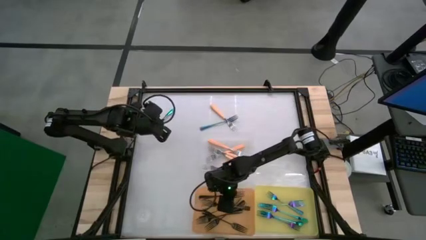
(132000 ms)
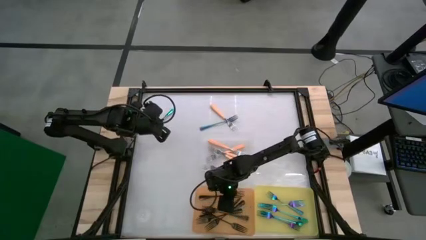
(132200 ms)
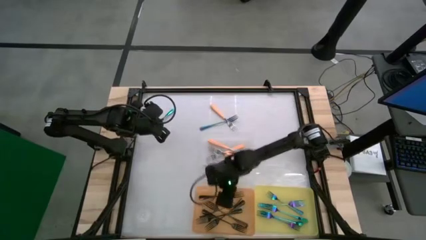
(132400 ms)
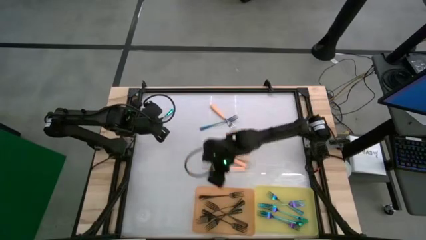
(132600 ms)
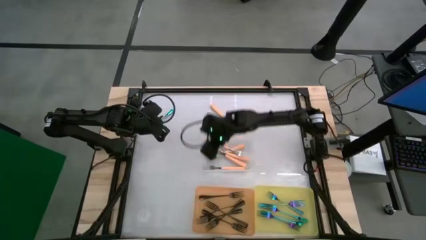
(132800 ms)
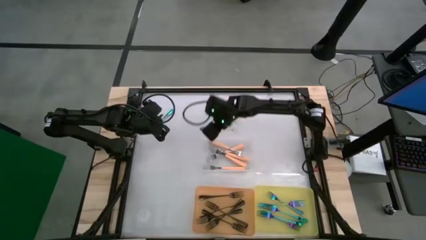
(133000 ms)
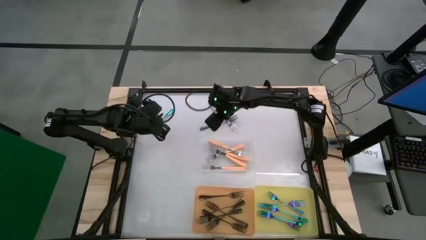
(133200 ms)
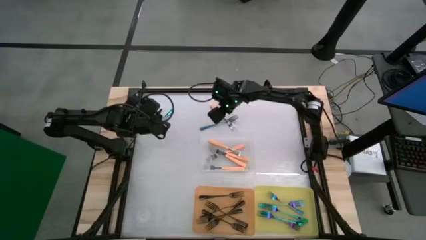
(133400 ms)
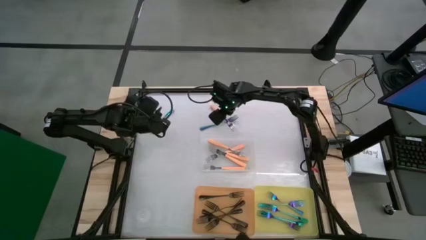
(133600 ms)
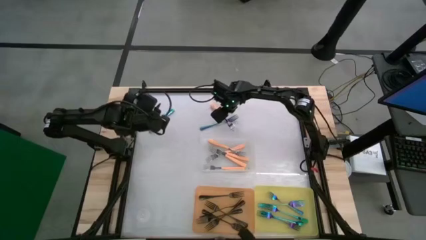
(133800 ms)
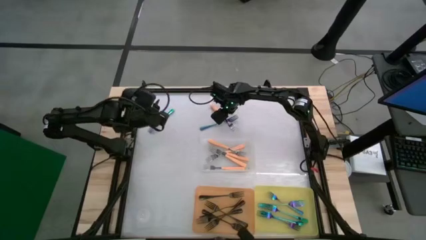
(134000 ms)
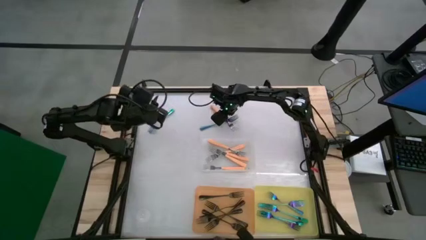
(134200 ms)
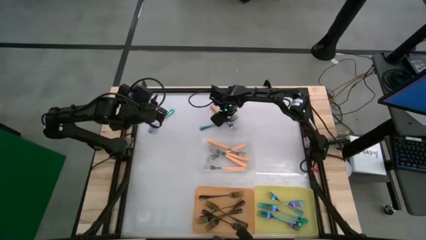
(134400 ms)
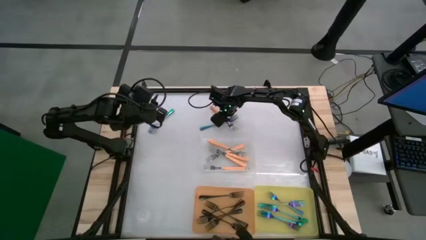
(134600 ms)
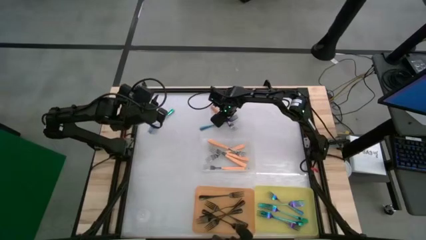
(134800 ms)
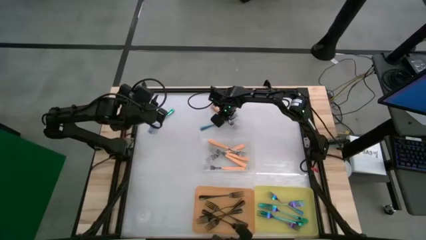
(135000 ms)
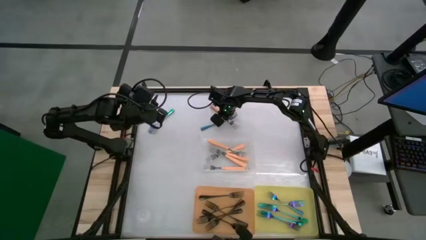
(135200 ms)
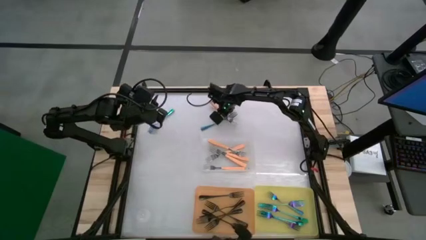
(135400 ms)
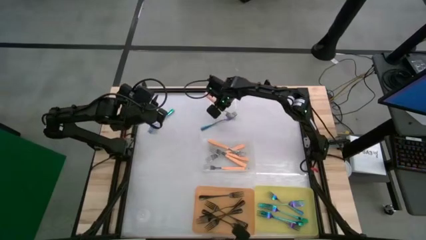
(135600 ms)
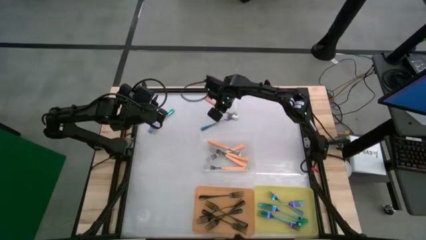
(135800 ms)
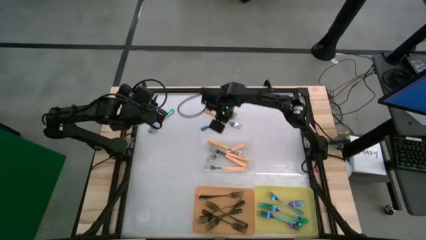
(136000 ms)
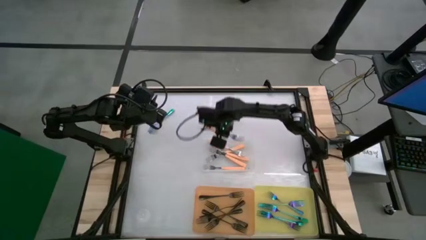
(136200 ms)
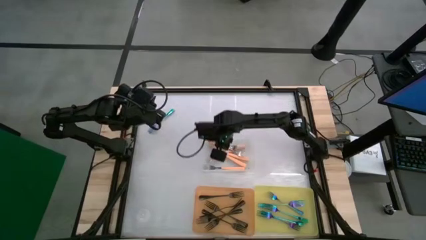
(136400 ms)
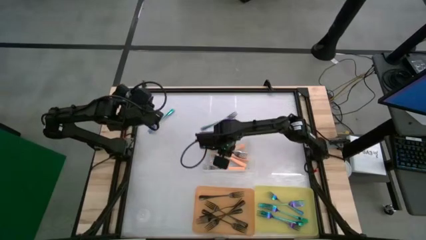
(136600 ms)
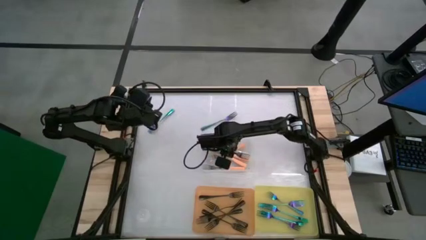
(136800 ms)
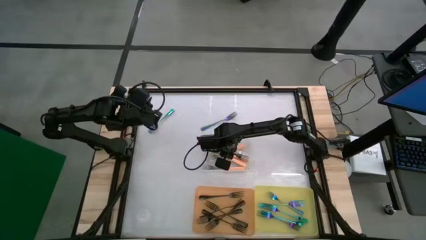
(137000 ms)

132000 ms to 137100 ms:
Task: Sort silverware by color (type)
Put the orange fork into the transparent bin

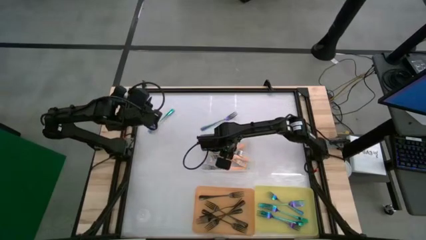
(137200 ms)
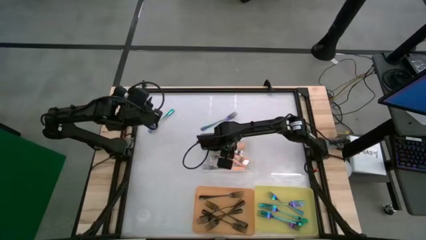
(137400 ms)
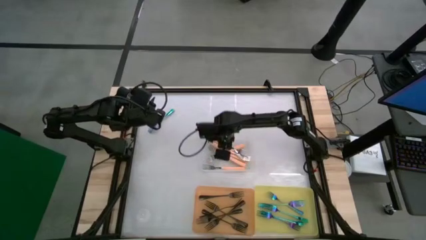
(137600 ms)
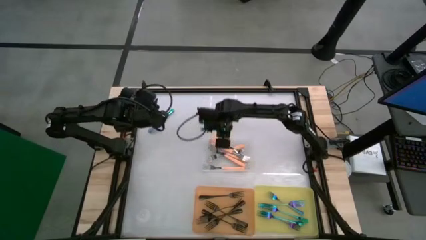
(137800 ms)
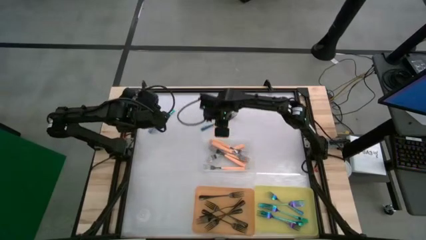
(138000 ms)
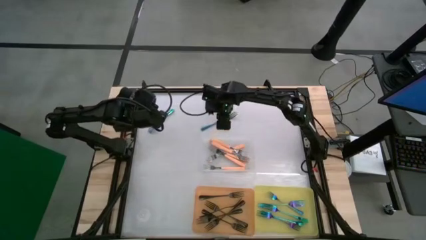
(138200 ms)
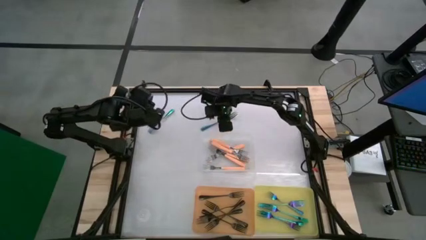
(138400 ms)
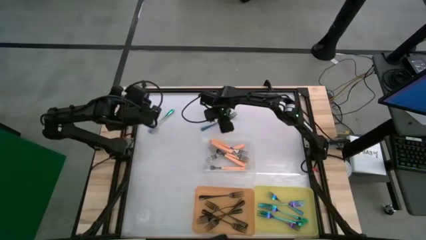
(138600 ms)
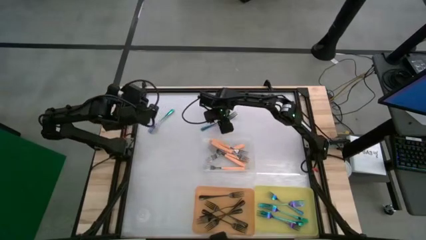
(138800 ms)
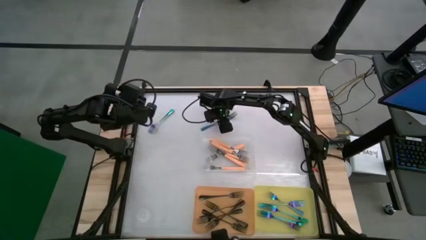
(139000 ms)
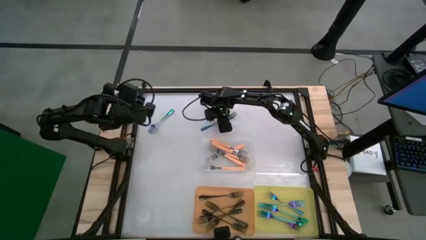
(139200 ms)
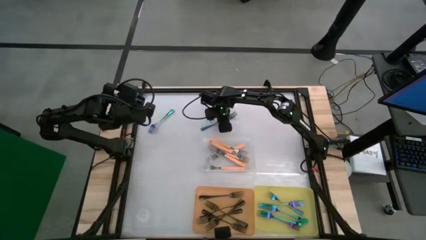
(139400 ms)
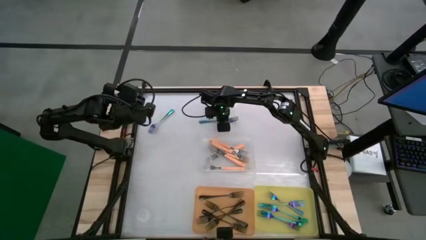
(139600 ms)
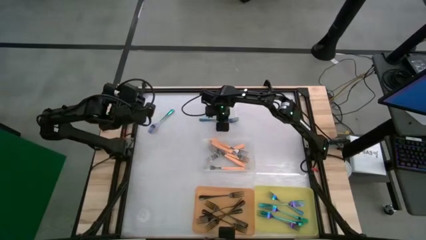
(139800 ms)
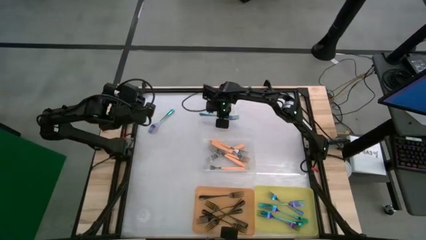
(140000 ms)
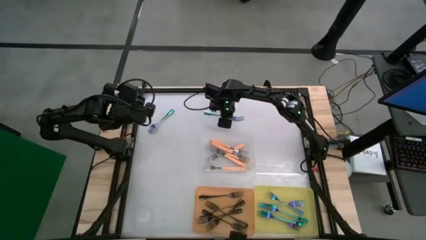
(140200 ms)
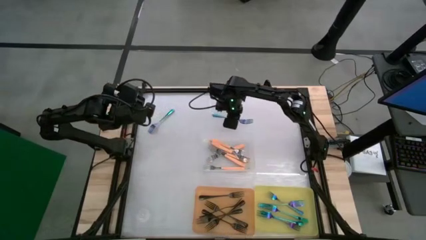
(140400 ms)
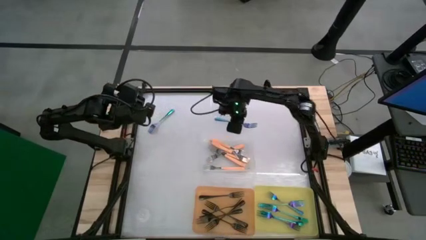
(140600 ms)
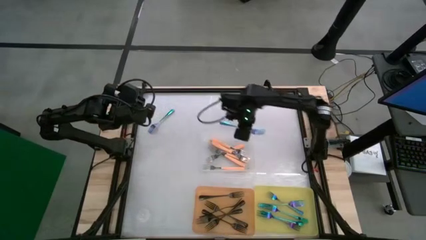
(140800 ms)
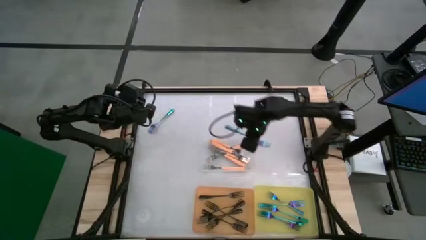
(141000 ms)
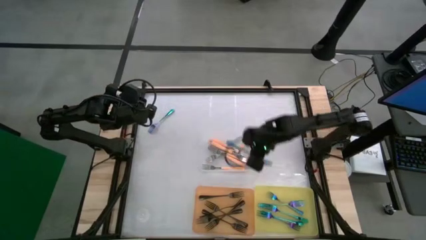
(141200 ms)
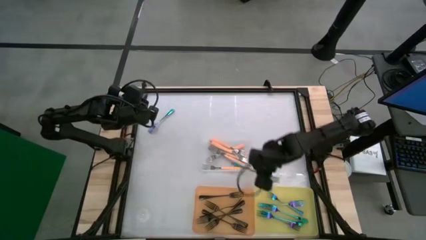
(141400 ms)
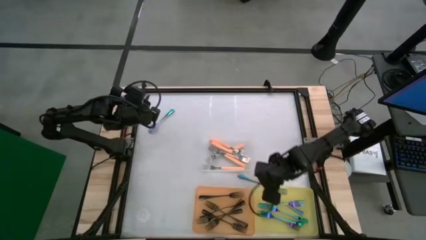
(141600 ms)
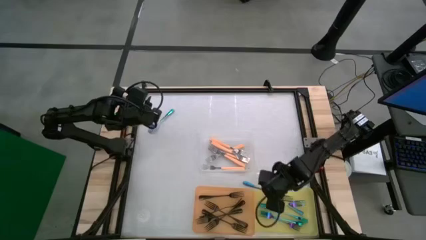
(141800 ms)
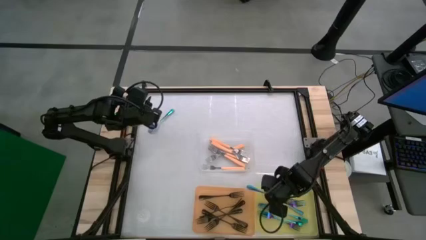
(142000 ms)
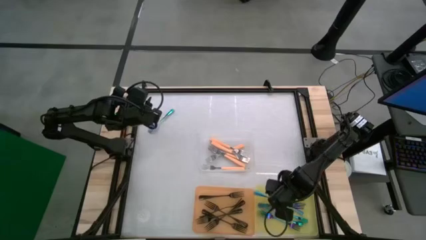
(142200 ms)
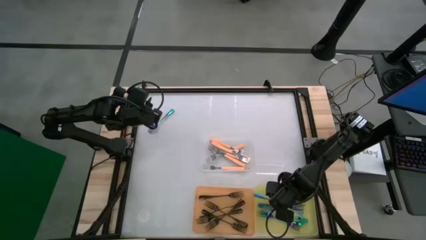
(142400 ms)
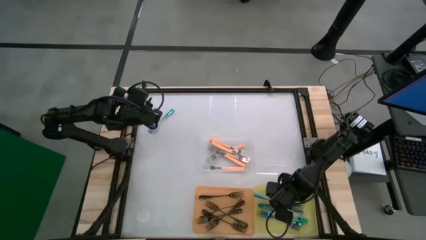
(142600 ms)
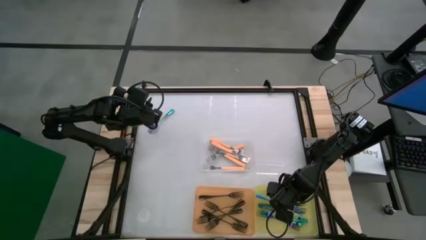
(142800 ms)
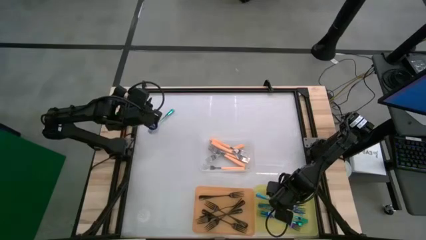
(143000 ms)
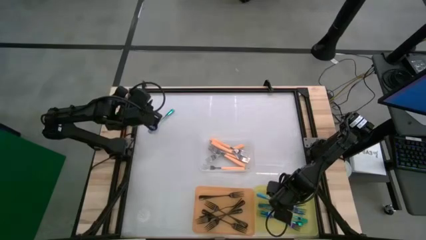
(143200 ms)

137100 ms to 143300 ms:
Put the blue fork into the yellow bin

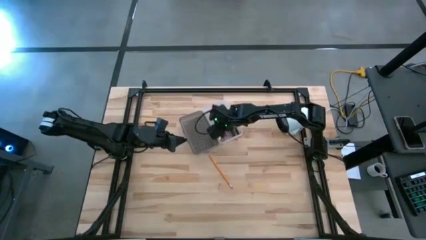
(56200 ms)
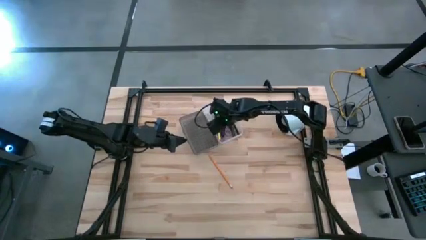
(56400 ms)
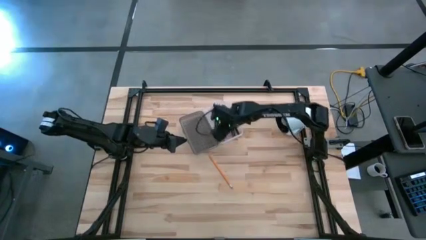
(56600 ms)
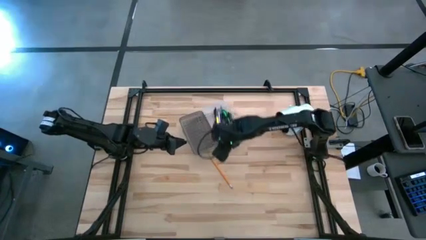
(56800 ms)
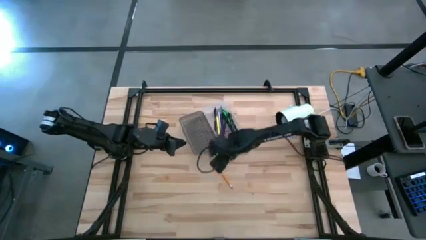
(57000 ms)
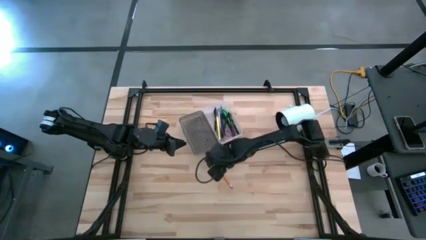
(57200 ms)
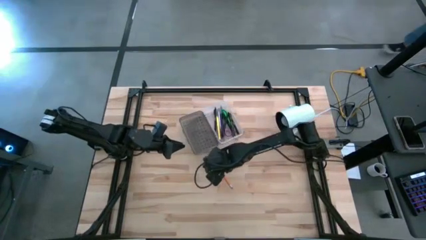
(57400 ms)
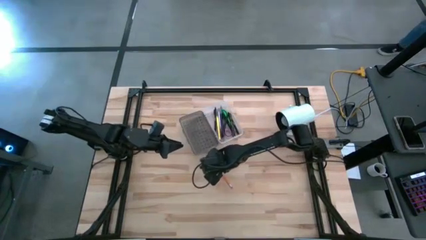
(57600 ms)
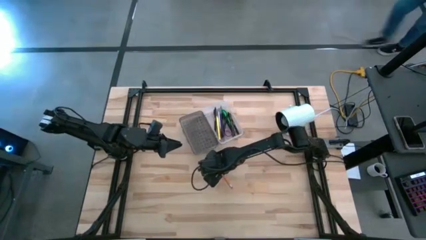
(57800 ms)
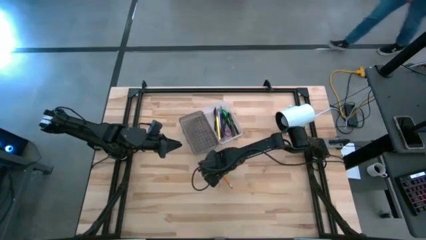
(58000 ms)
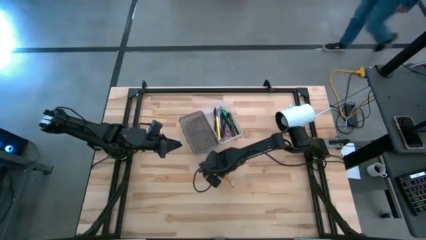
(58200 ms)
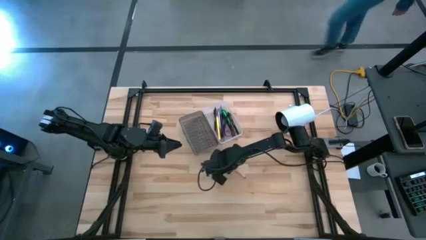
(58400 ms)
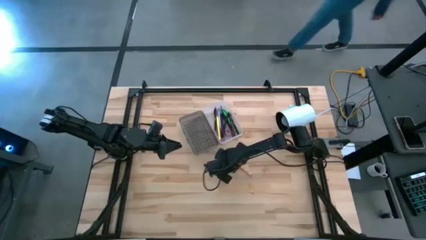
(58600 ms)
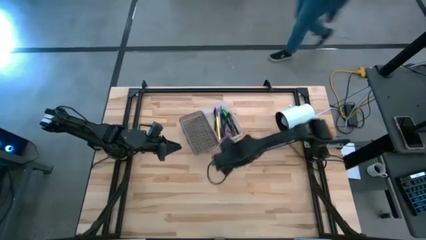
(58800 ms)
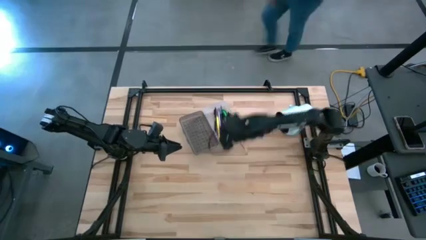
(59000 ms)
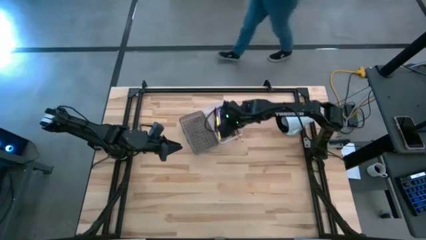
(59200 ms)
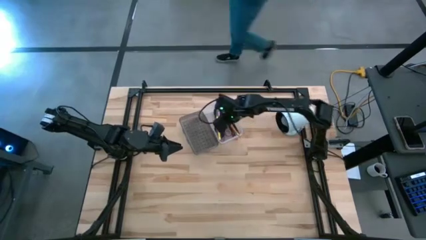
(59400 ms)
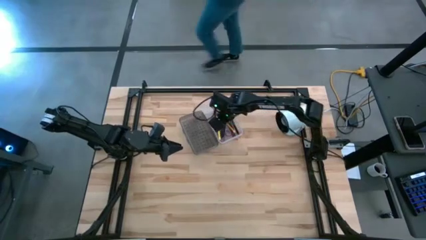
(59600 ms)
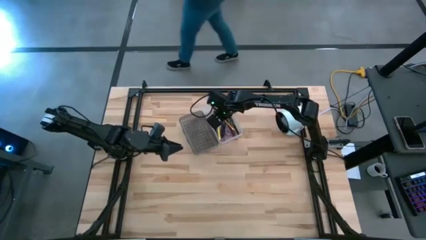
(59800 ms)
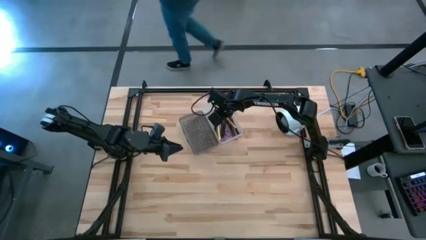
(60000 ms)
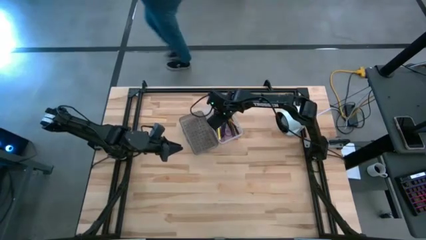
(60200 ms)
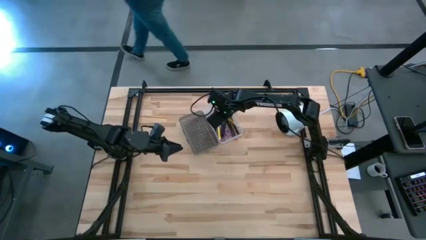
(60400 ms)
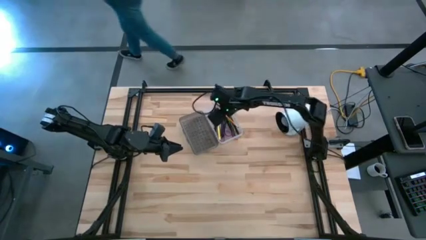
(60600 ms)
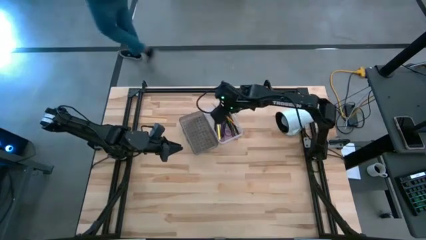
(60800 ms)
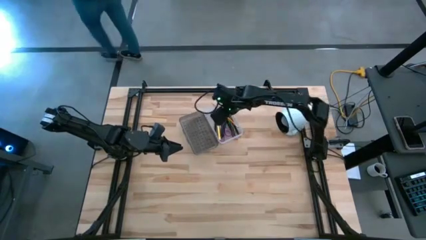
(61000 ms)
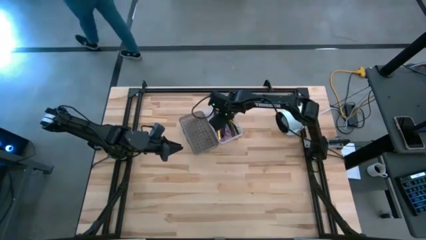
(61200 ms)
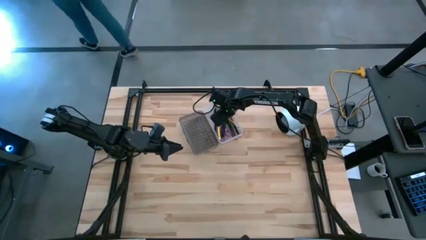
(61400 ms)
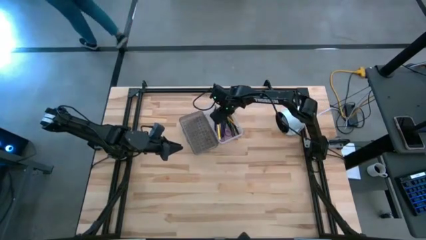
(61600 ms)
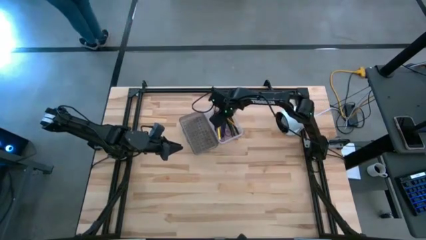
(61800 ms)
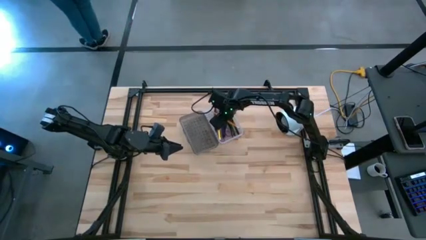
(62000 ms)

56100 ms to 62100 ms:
Task: Pick & place school supplies into a supply box
Put the orange pencil into the black supply box
